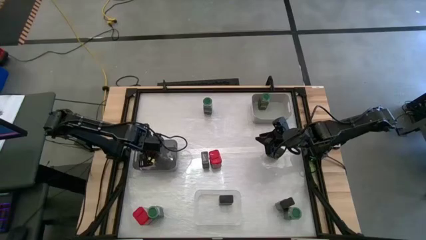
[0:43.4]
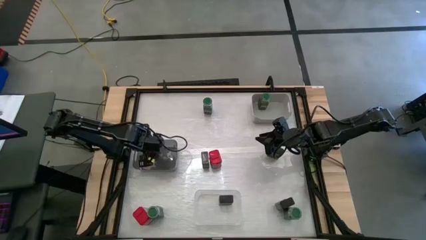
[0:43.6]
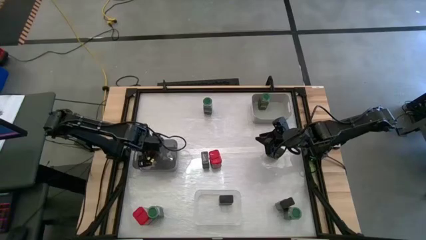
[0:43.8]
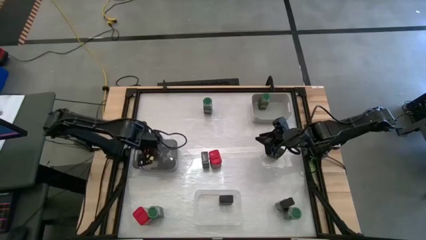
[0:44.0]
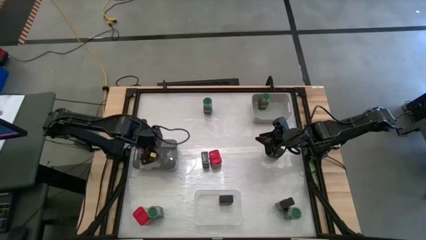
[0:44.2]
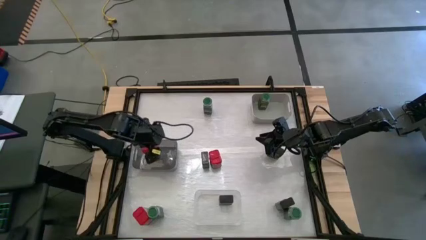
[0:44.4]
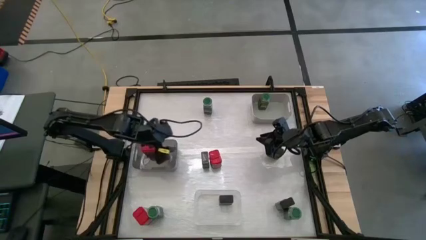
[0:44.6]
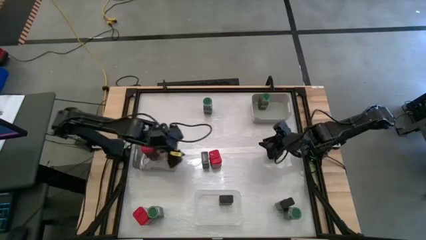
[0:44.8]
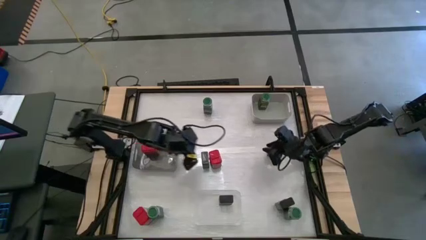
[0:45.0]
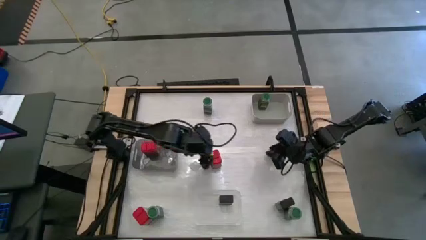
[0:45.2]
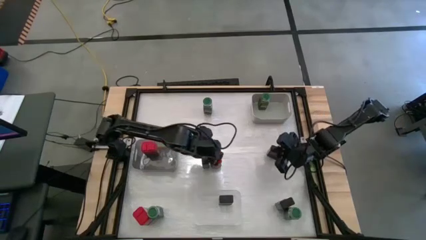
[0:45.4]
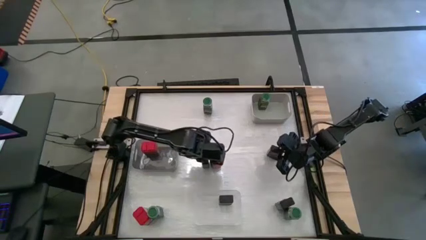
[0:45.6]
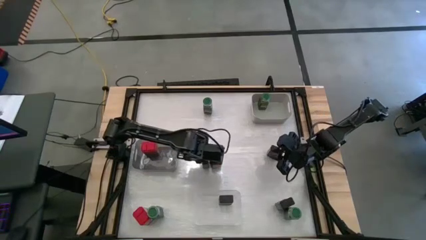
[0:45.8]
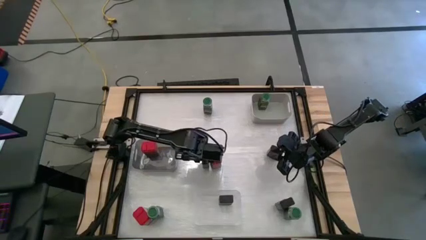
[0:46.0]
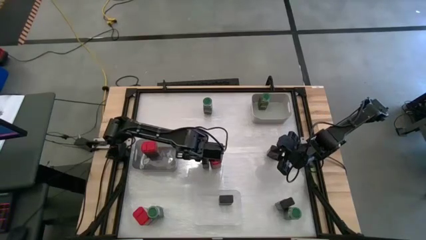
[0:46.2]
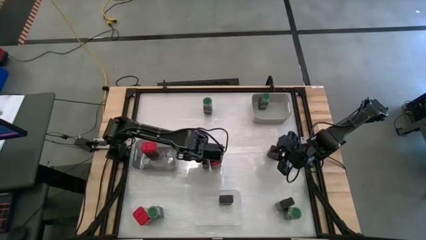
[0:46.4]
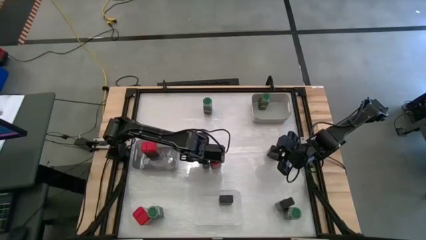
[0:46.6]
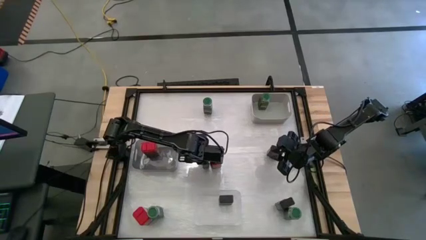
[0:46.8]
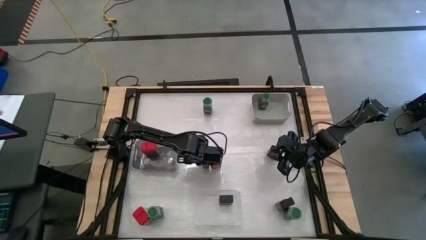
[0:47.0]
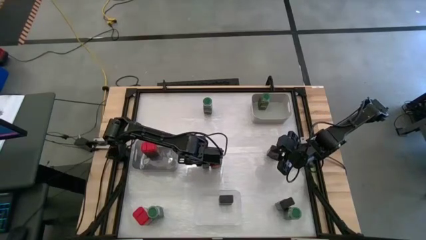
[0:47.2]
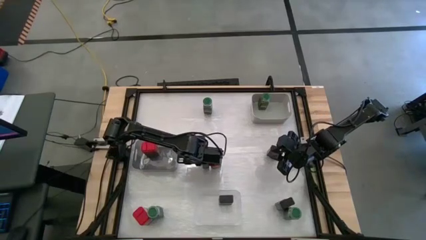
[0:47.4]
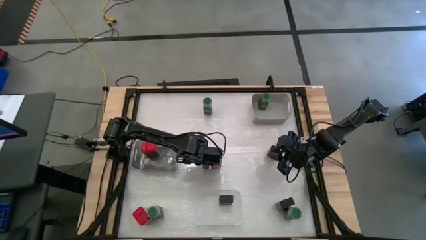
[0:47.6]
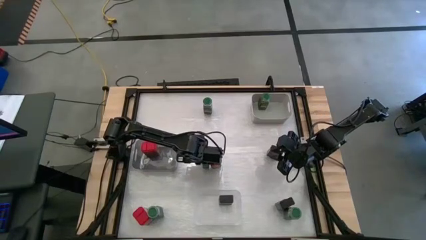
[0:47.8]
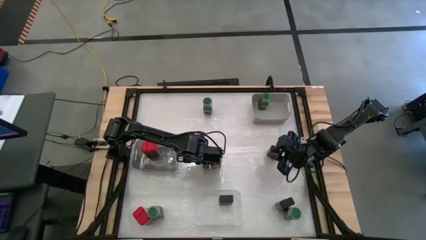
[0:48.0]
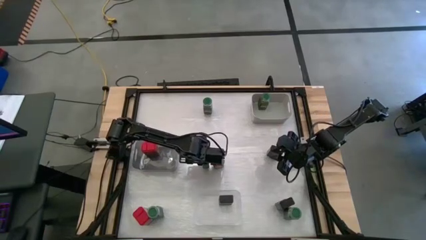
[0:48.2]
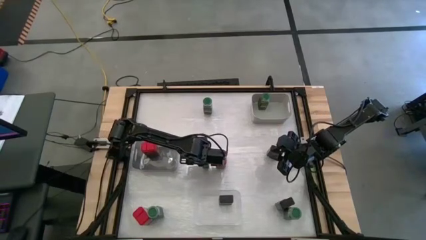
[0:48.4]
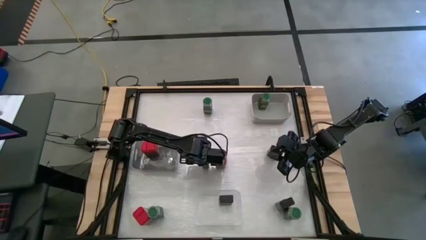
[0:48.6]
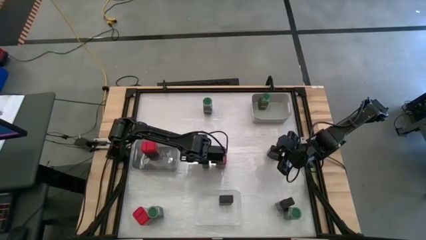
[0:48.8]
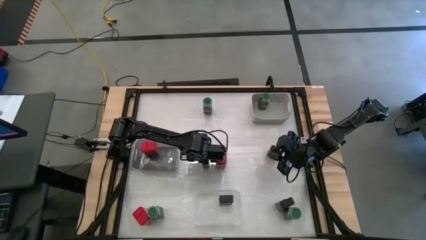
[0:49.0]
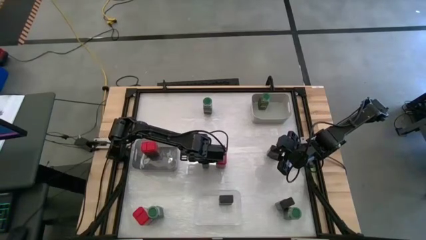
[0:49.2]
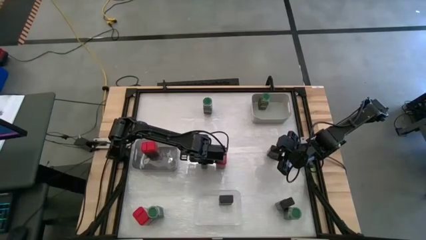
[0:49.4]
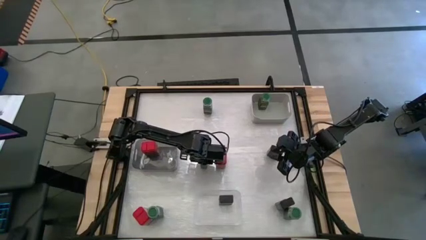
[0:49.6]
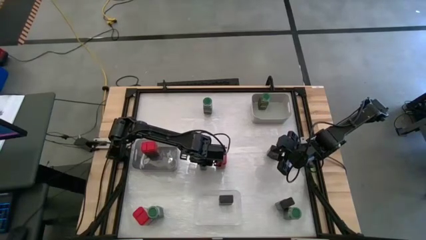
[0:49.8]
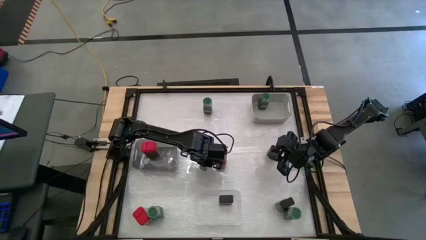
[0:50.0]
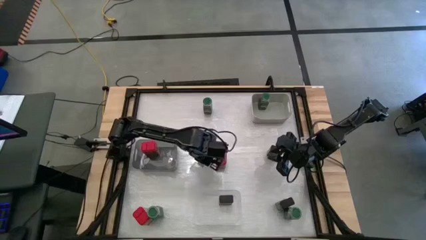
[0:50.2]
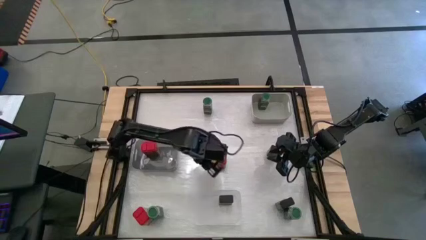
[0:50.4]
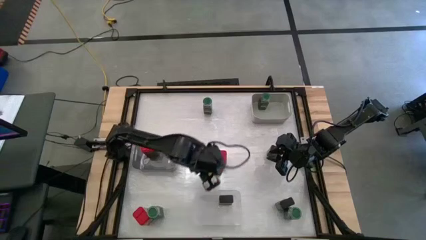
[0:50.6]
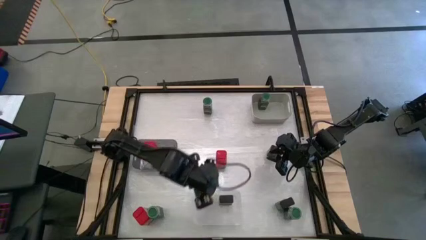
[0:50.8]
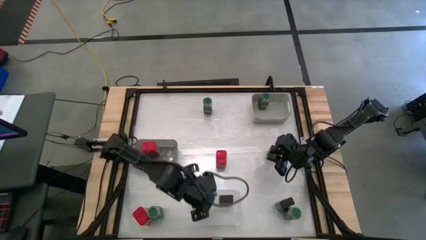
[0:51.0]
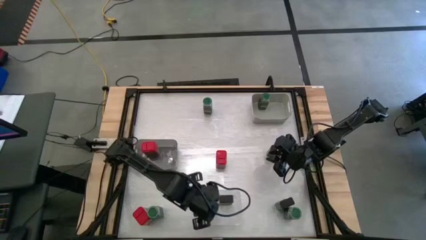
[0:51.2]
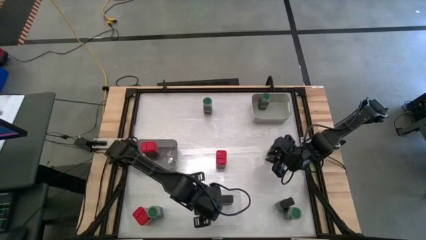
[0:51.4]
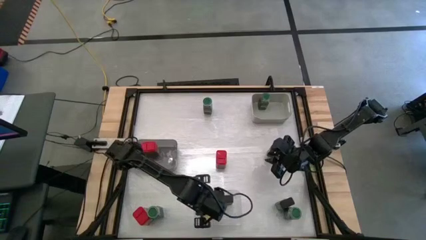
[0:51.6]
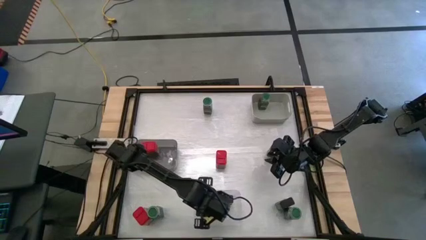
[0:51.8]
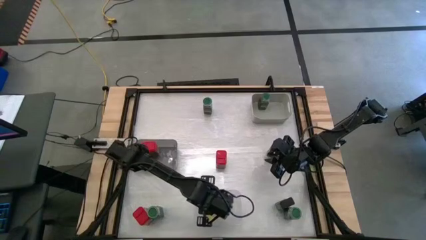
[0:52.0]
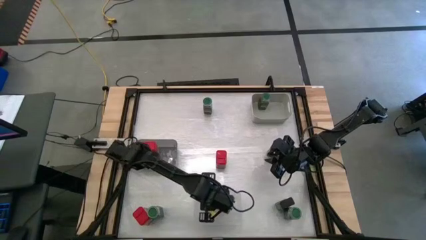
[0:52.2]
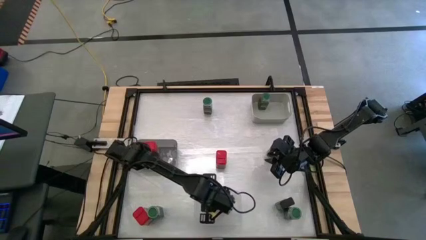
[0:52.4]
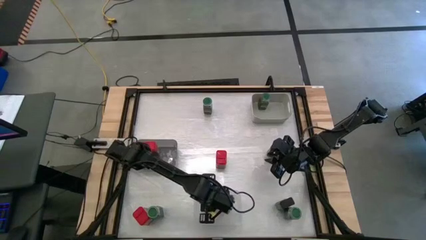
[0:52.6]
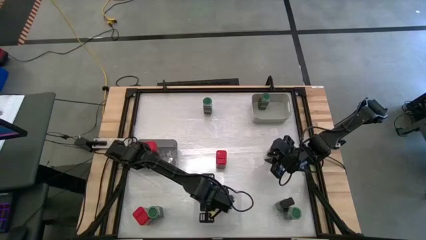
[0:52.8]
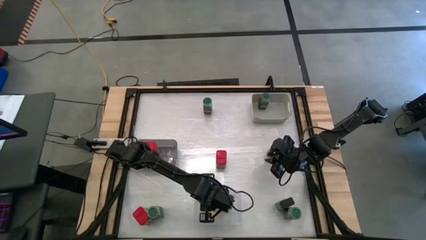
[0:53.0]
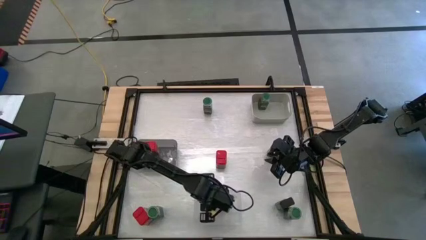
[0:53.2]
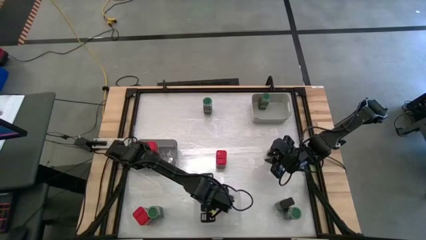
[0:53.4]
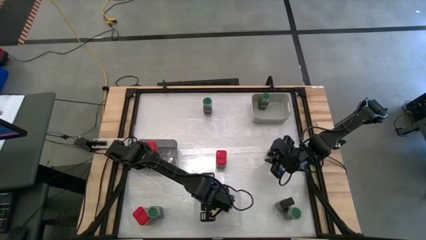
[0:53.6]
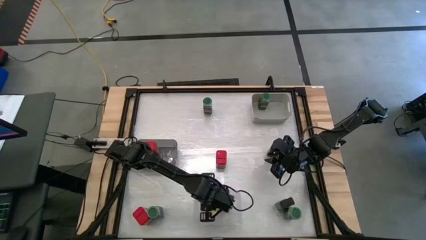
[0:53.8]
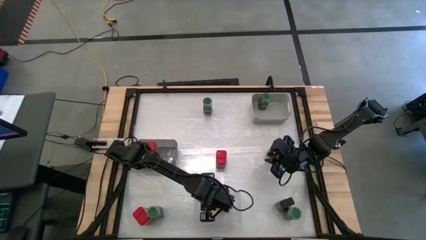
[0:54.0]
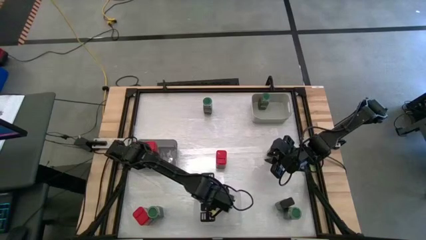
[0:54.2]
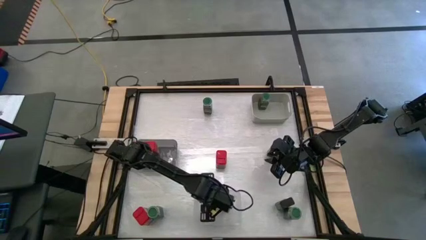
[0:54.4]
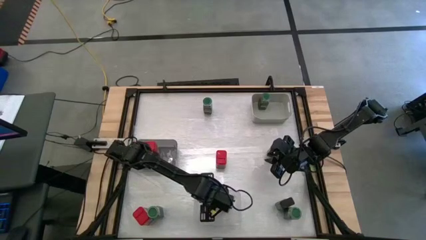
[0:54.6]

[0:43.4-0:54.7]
Task: Sort spices by type
Put the top left black seasoning can into the transparent bin

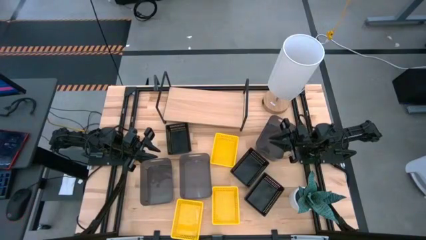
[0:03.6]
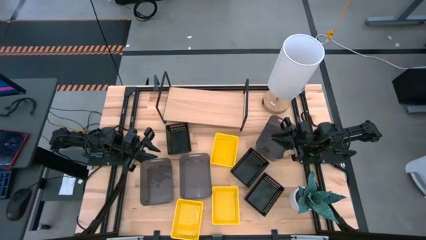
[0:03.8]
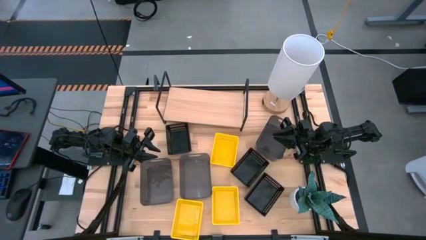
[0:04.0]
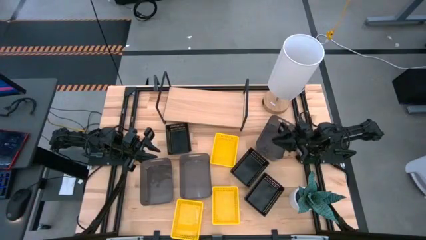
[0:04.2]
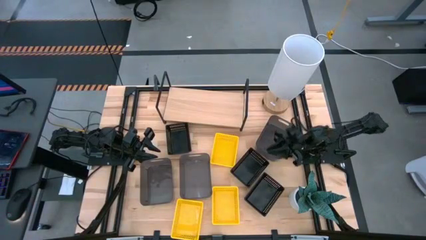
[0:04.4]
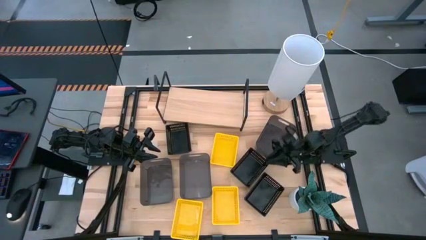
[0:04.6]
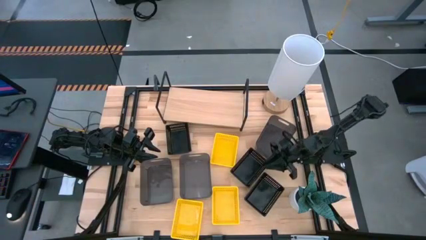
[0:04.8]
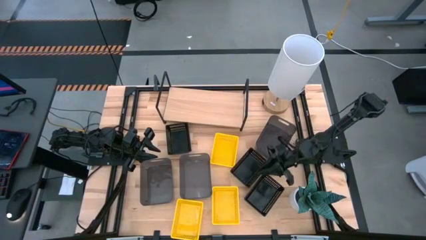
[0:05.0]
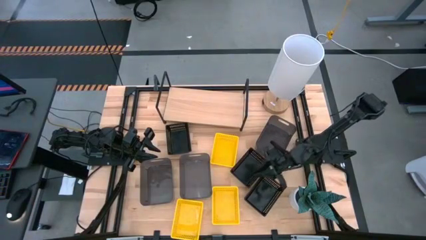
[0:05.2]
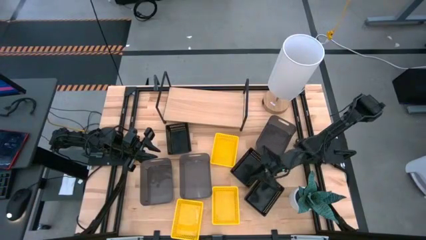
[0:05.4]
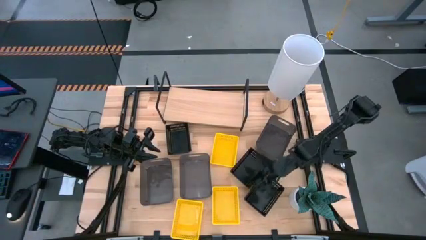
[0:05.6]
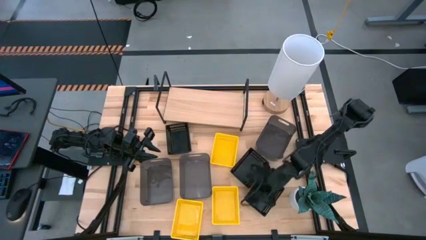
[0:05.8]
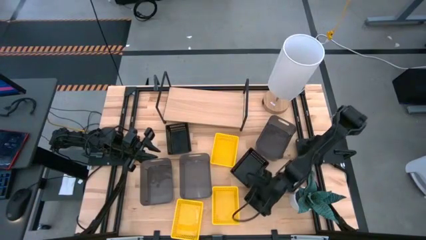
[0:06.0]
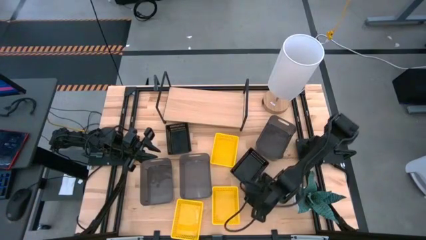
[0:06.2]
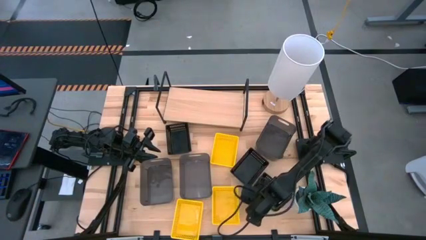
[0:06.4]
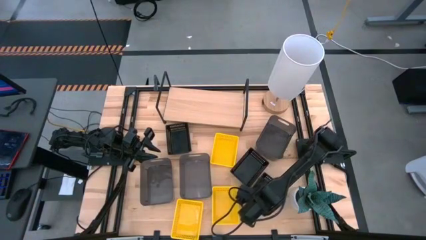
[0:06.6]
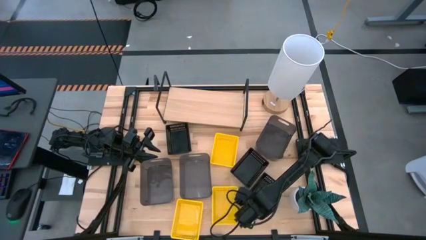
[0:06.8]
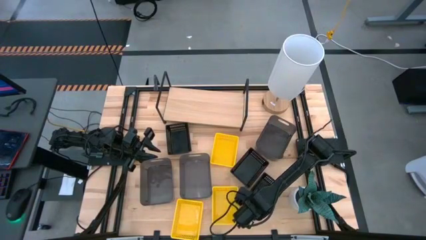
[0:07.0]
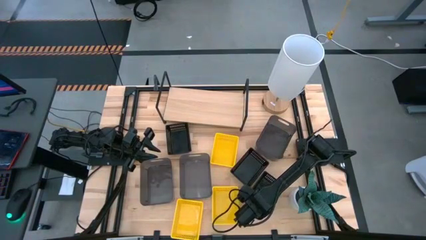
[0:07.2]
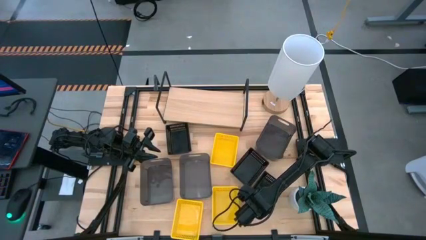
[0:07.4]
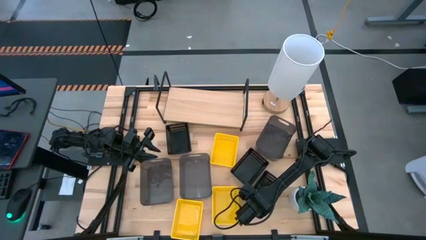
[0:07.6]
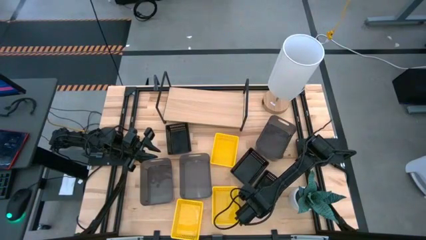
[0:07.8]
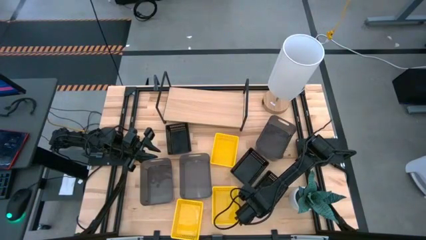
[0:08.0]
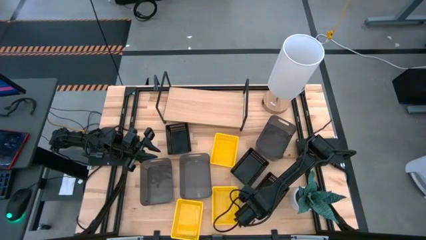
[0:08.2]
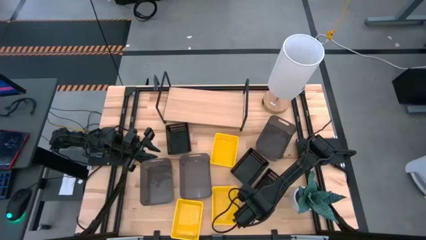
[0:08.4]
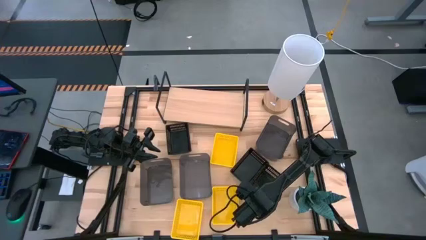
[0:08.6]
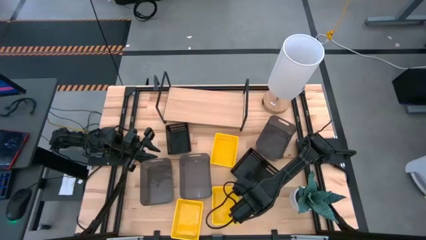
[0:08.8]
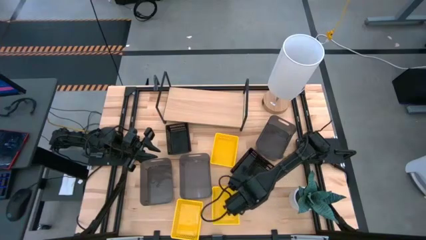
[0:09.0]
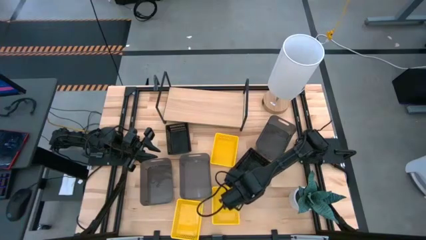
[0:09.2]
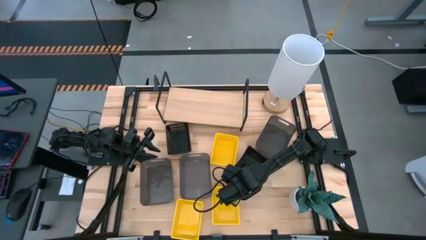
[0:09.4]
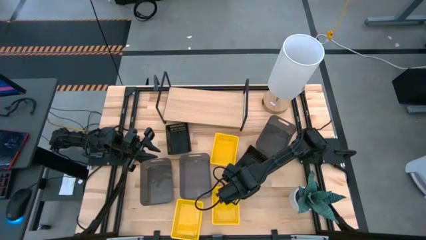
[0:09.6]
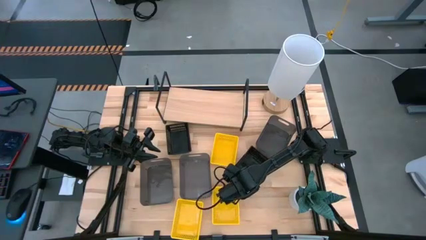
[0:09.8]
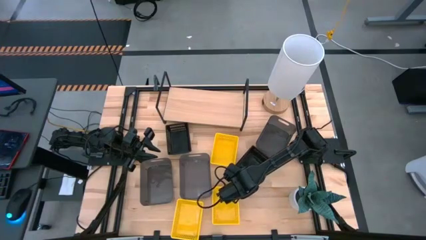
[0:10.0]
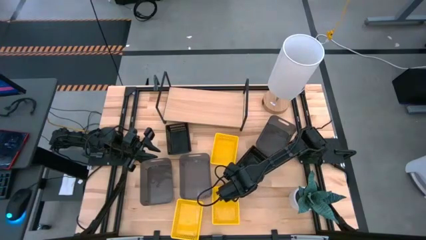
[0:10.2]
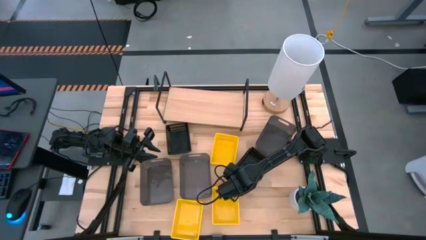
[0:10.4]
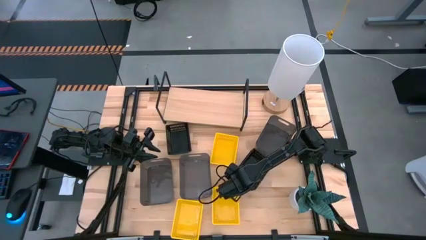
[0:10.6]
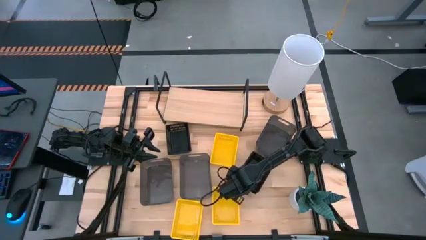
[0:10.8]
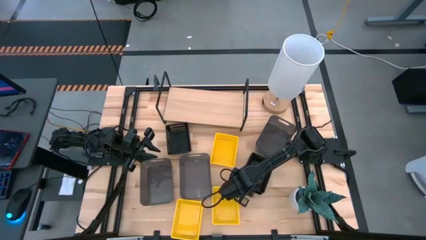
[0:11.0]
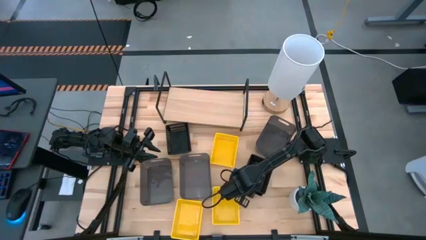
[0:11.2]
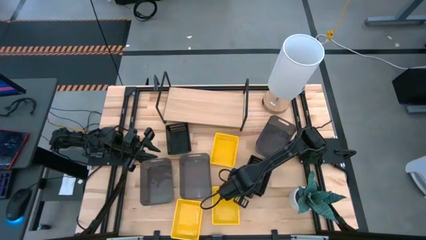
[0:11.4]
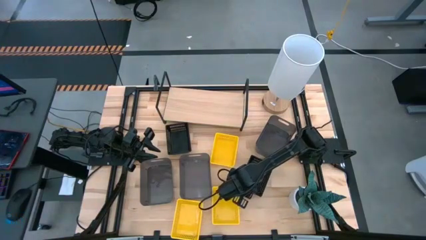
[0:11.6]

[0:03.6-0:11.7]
Task: Stack baskets on shelf by color
Stack the bottom right black bin on top of the bottom left black bin
